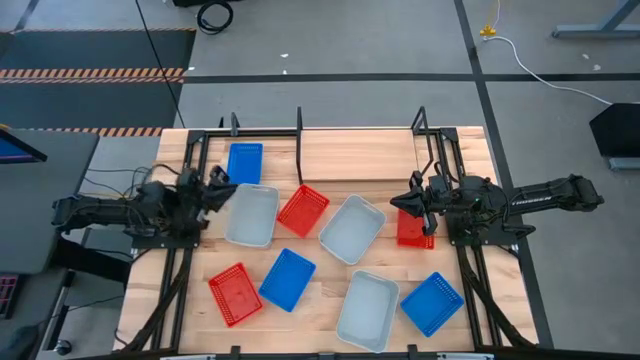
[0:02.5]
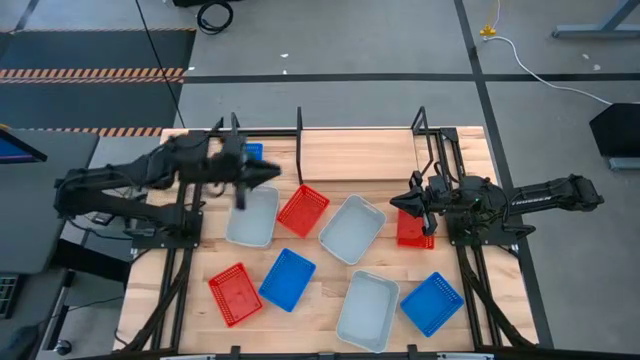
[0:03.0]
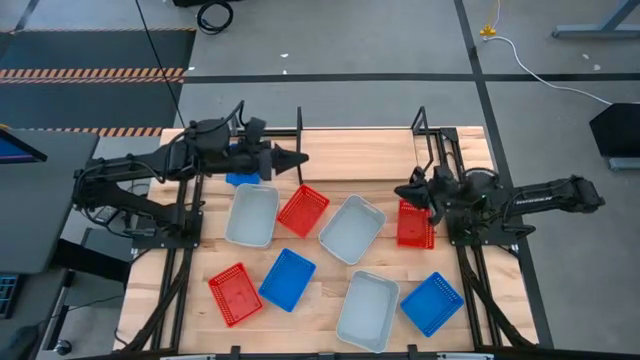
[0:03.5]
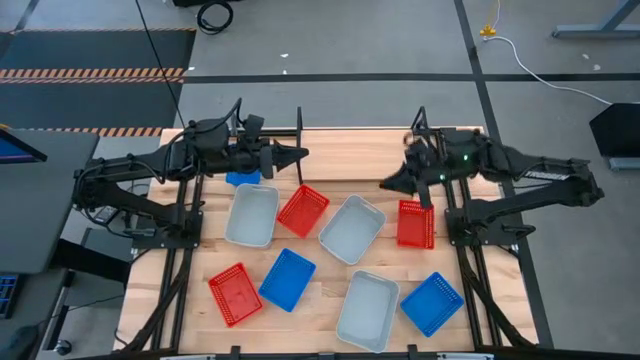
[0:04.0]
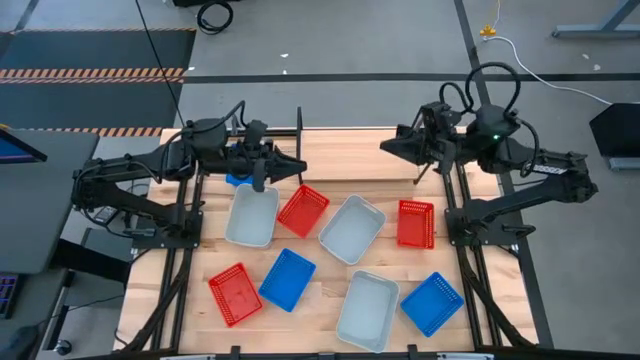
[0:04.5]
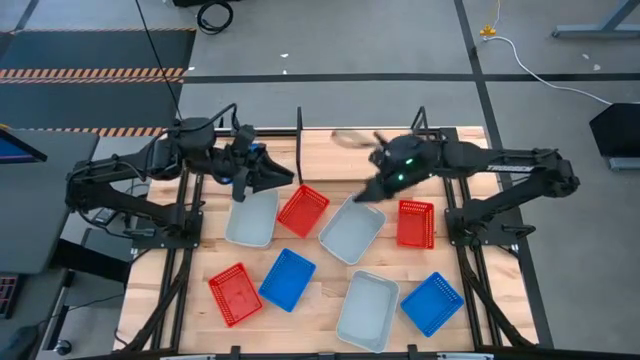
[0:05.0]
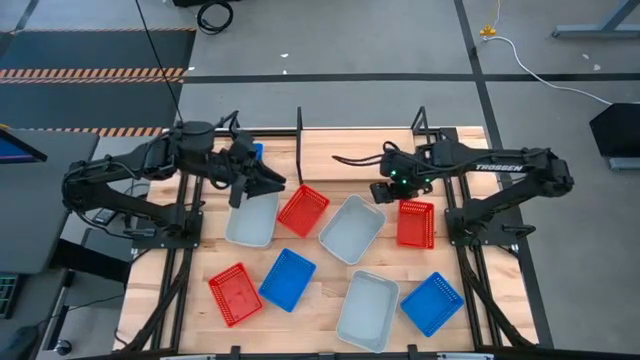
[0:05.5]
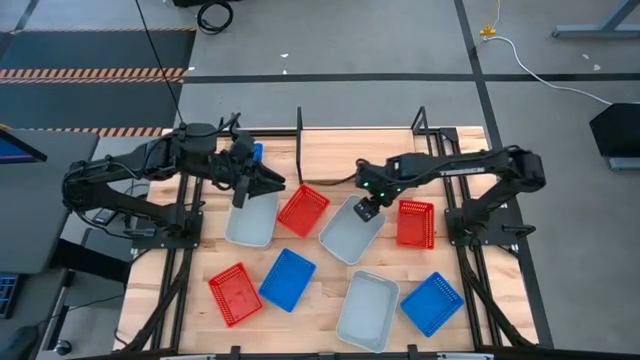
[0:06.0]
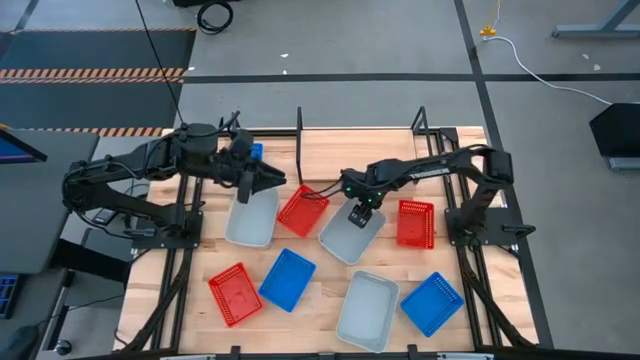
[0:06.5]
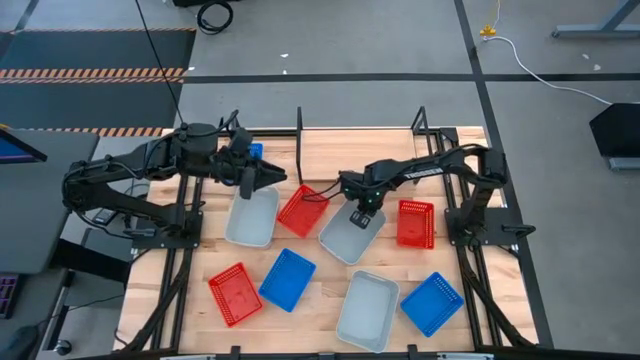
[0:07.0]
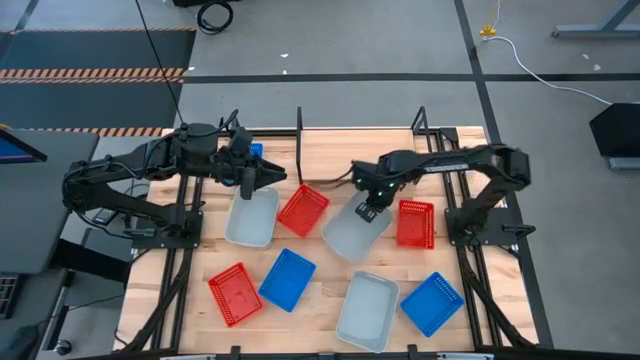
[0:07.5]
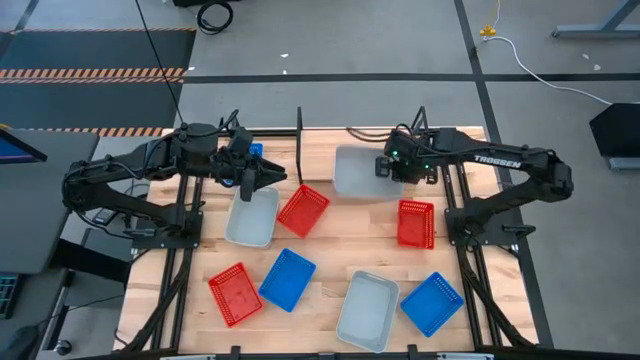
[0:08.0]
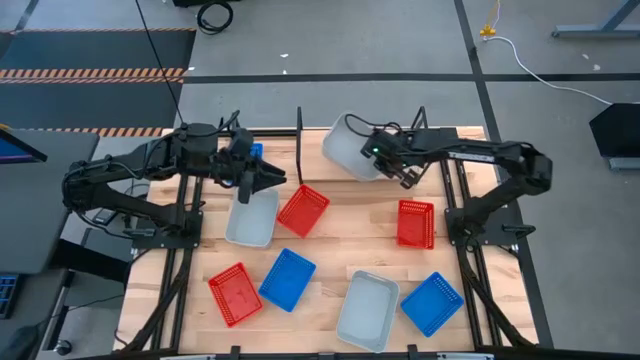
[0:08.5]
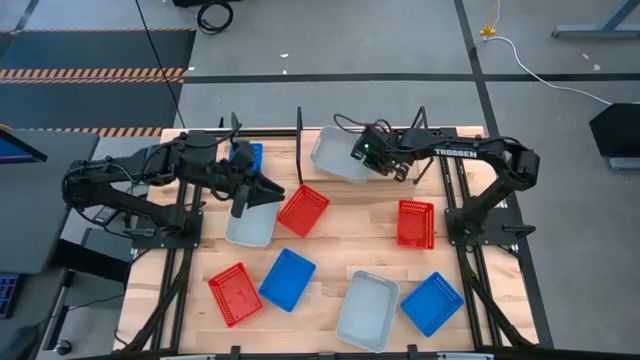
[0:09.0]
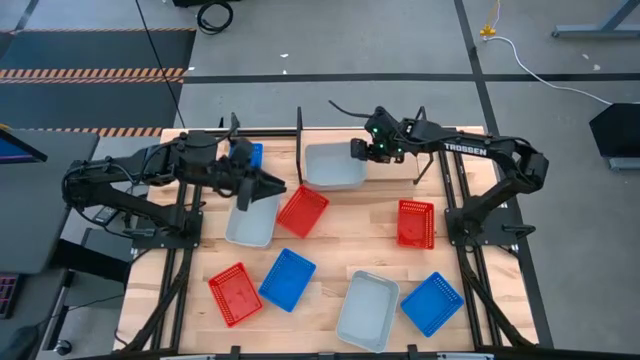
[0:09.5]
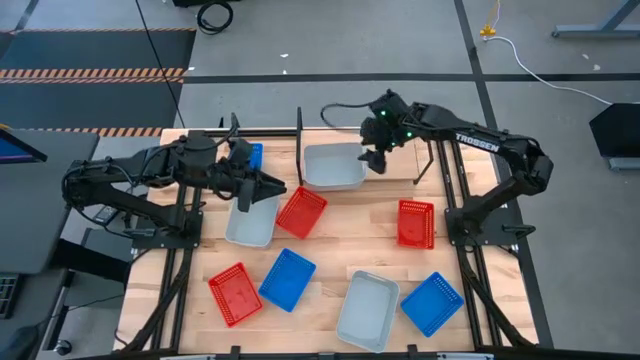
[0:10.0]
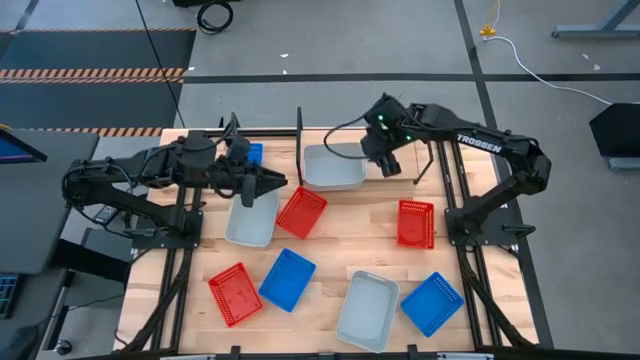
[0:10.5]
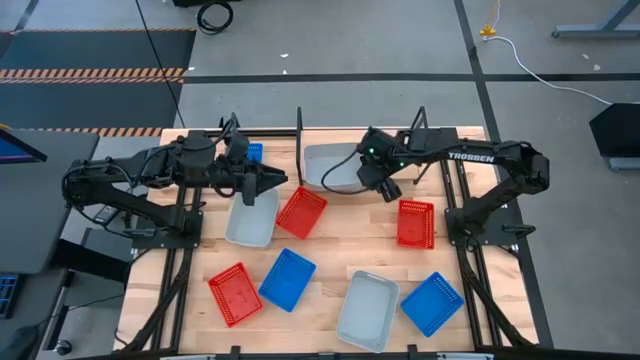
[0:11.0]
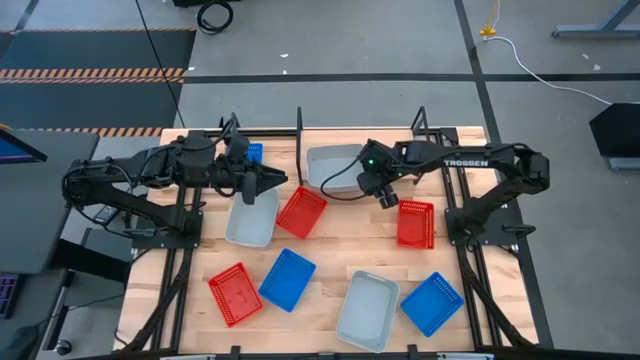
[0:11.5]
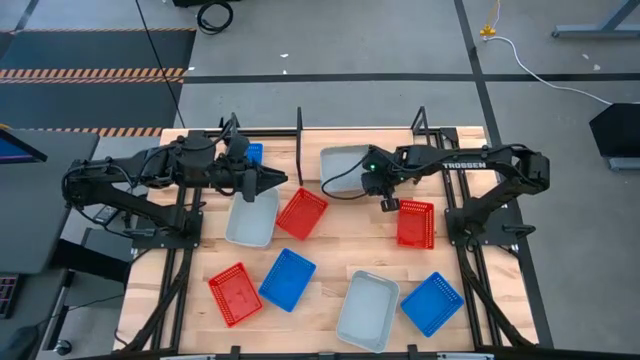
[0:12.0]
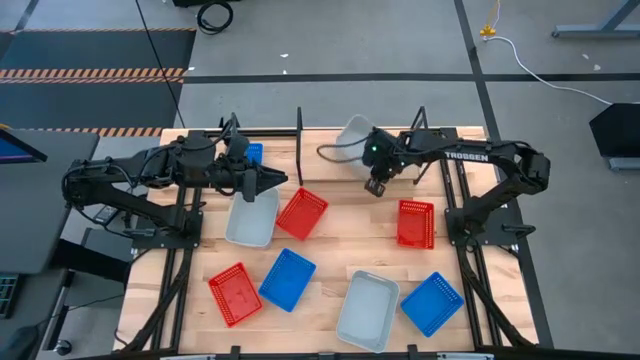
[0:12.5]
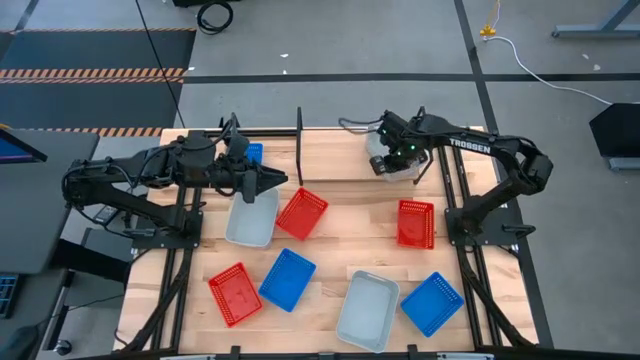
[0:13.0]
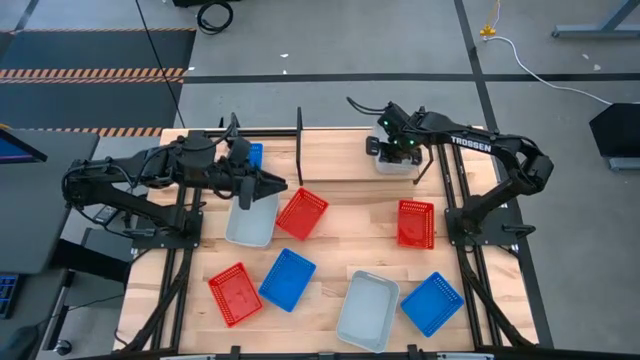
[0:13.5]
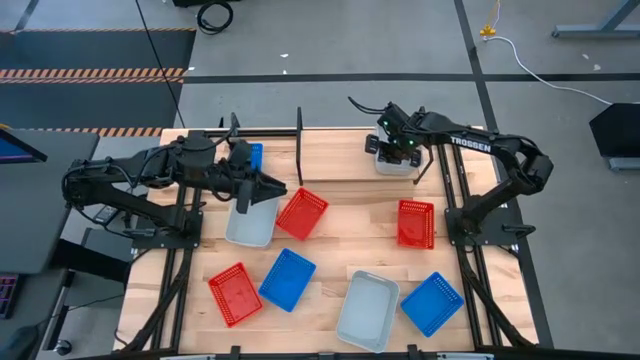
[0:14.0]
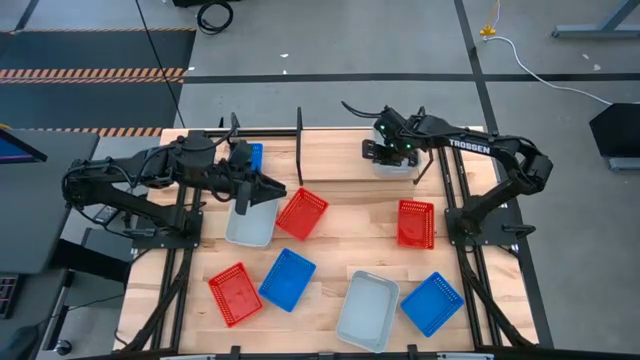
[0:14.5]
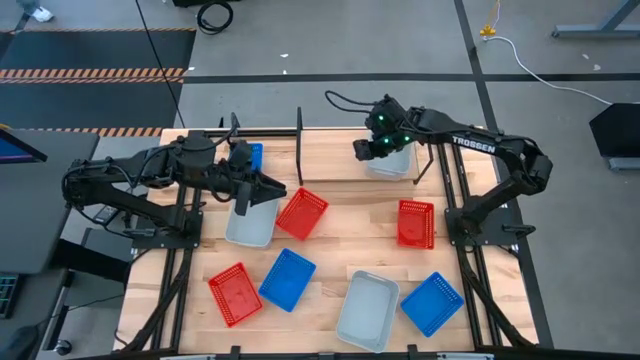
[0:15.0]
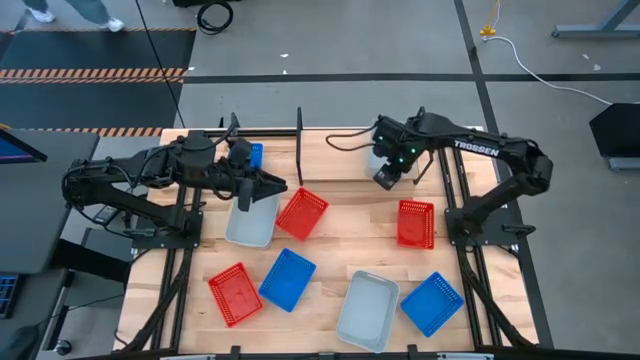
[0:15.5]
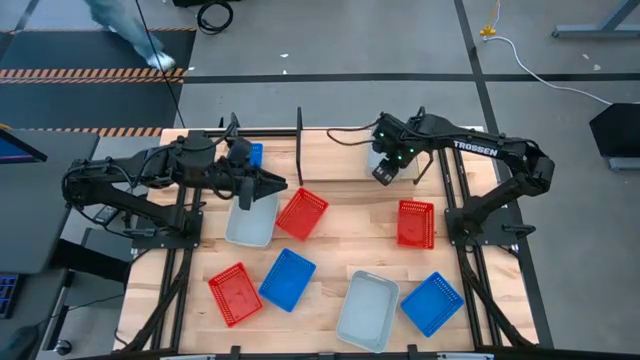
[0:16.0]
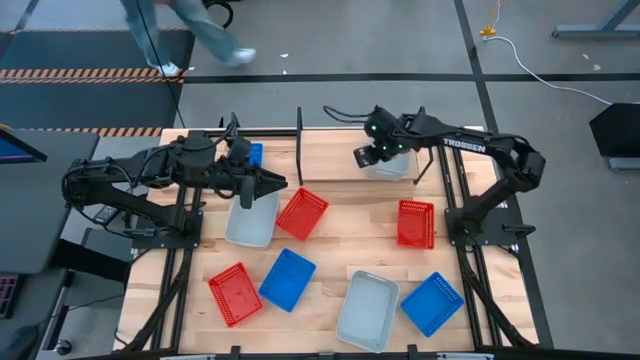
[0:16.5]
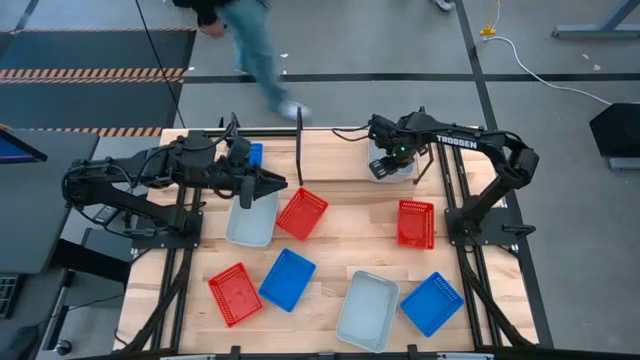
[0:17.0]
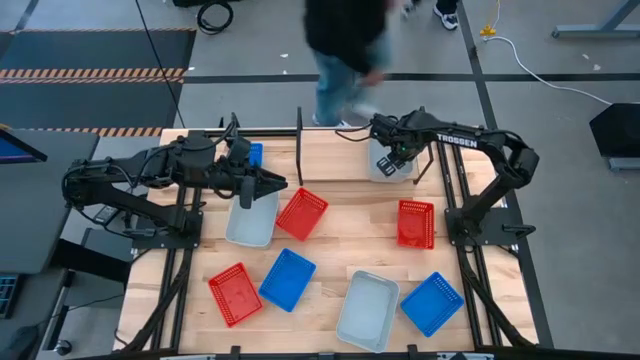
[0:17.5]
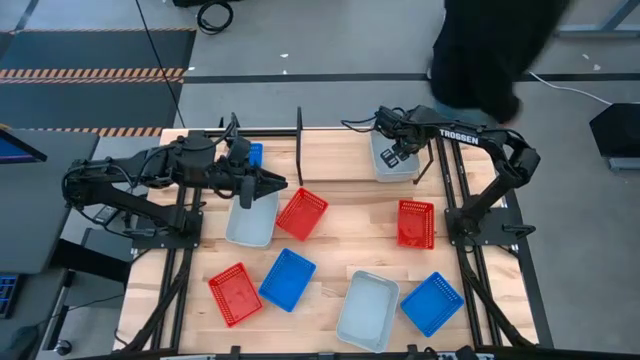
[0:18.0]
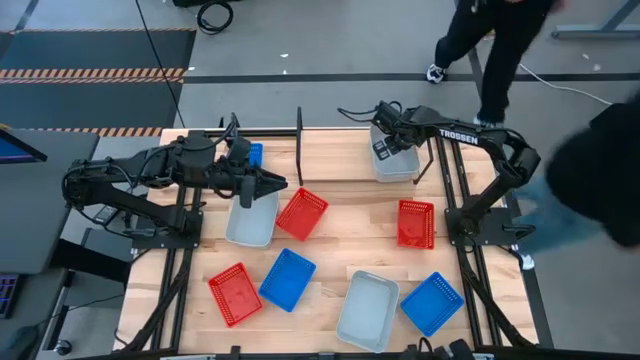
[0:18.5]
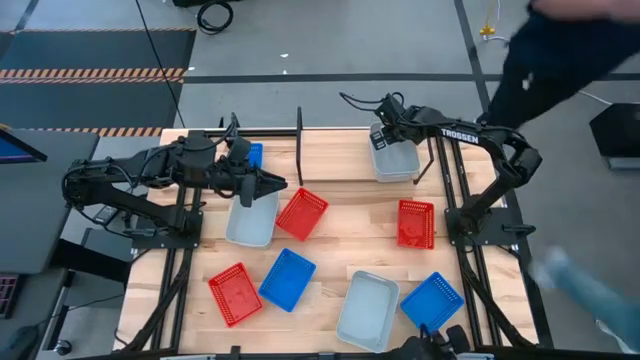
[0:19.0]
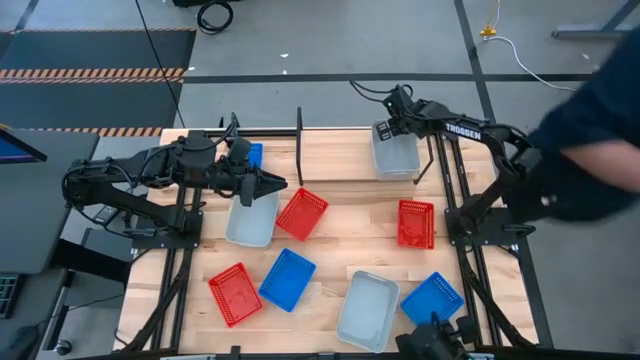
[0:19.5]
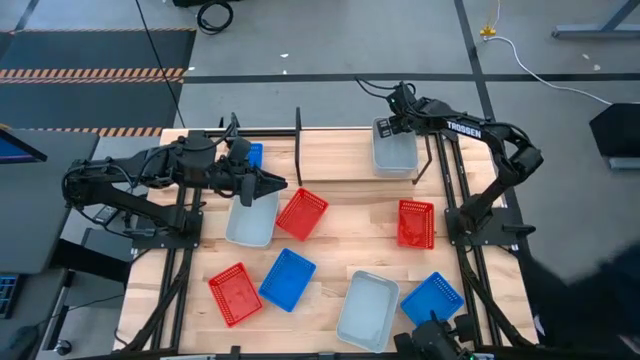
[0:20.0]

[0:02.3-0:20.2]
Task: Stack baskets on shelf by color
Put the top right gray bin on the shelf
